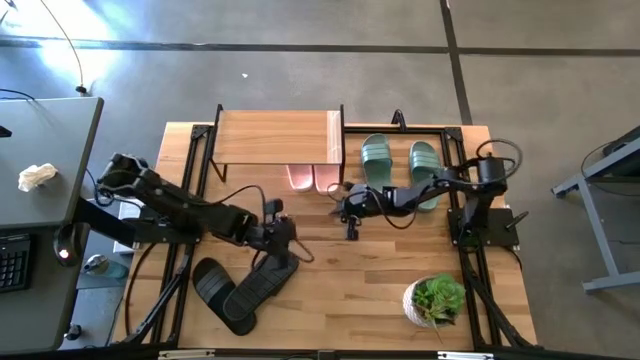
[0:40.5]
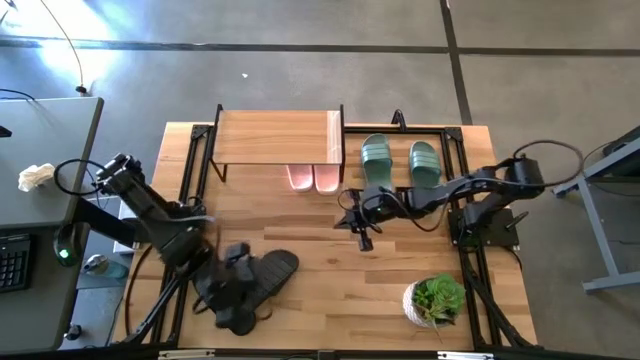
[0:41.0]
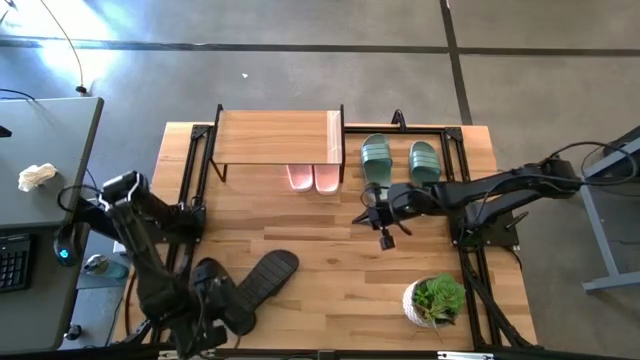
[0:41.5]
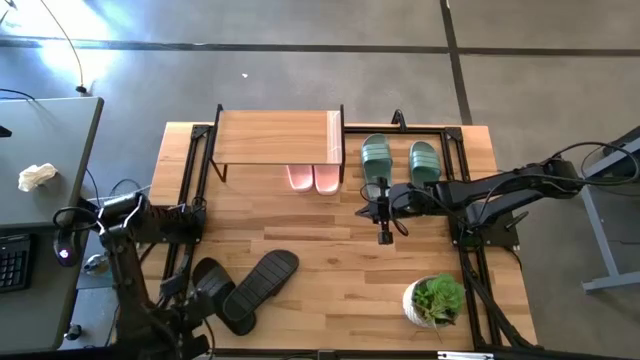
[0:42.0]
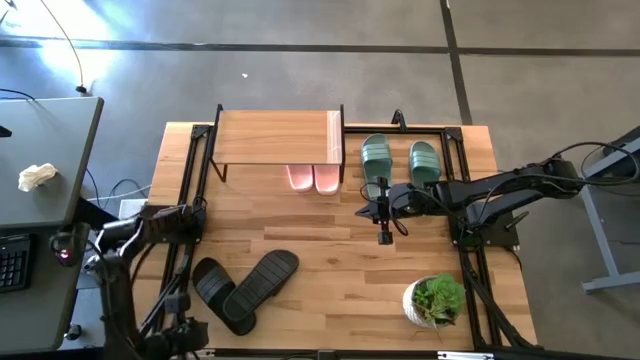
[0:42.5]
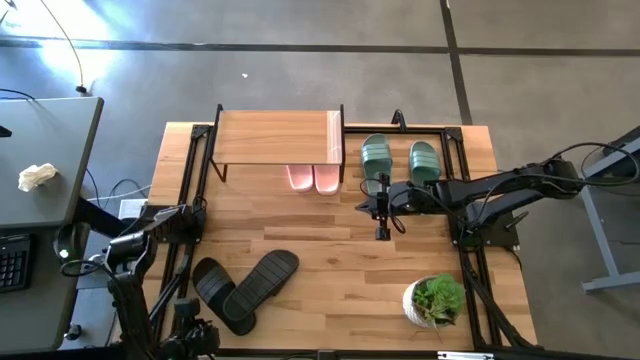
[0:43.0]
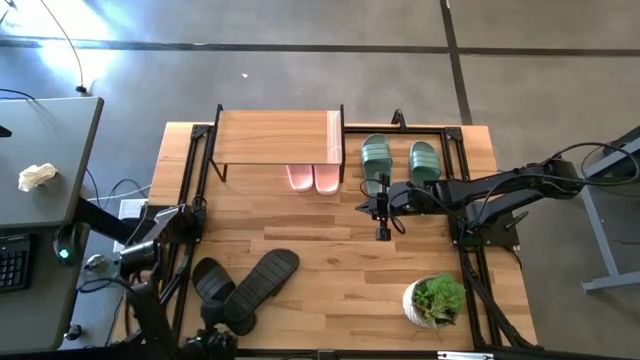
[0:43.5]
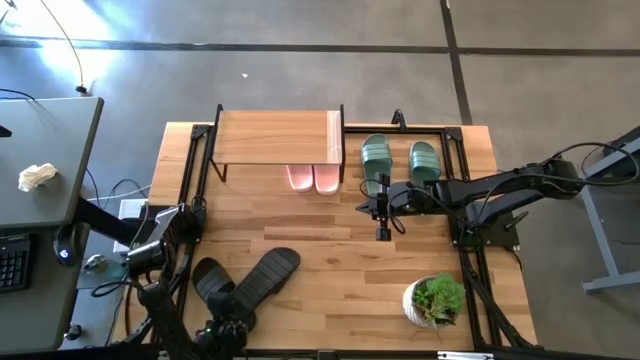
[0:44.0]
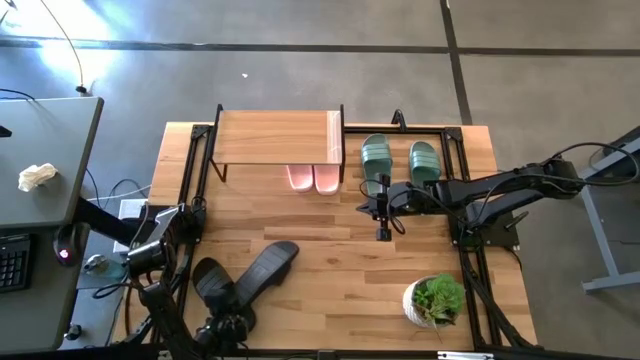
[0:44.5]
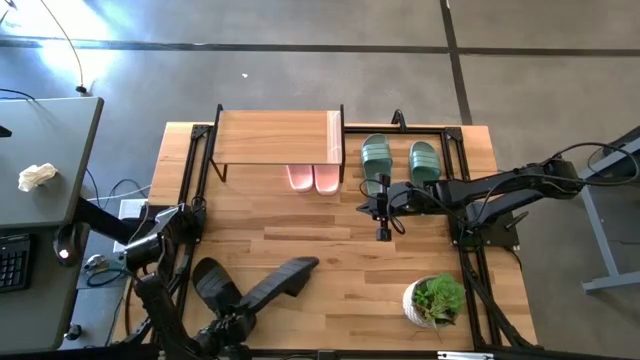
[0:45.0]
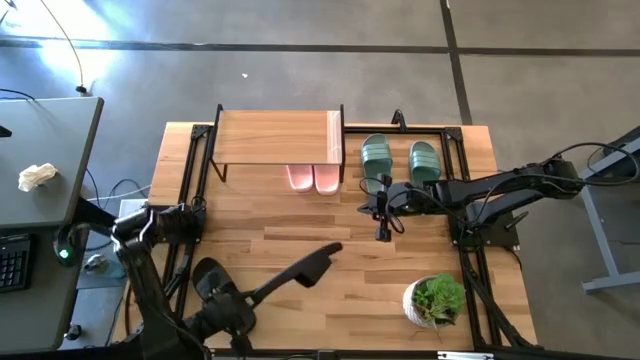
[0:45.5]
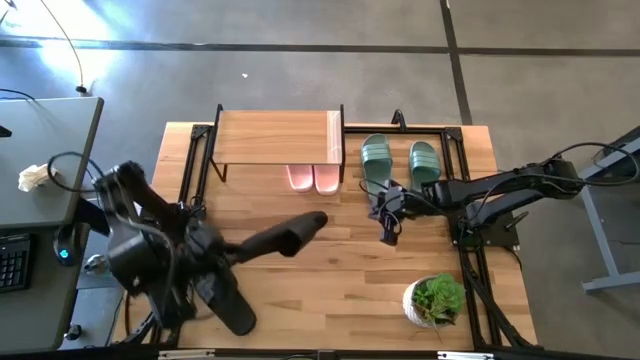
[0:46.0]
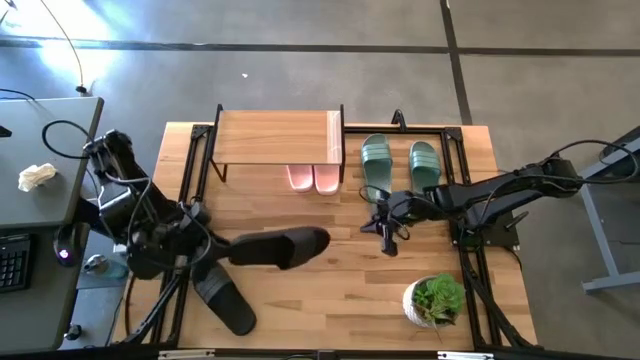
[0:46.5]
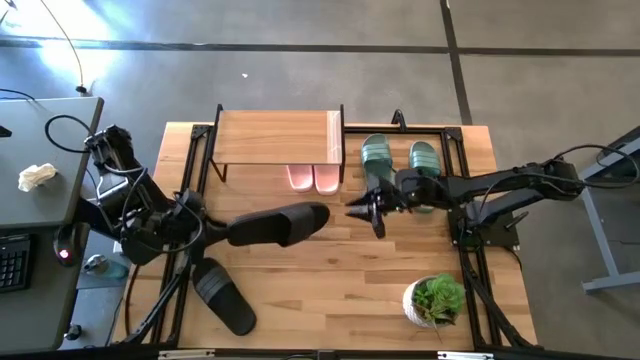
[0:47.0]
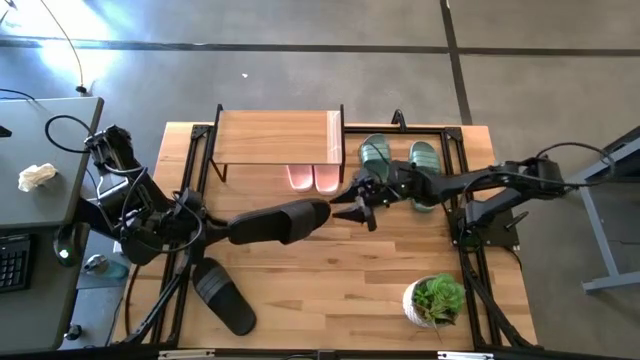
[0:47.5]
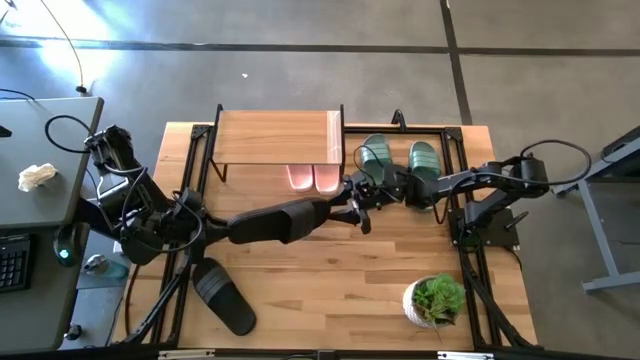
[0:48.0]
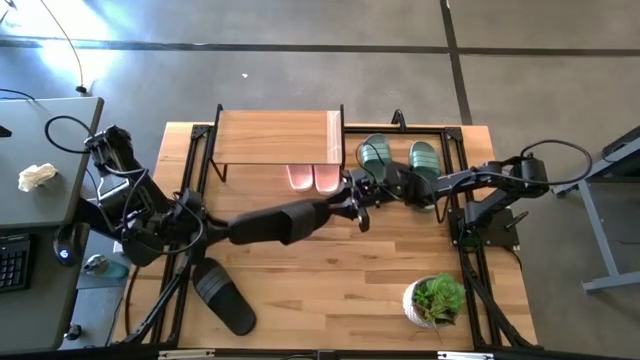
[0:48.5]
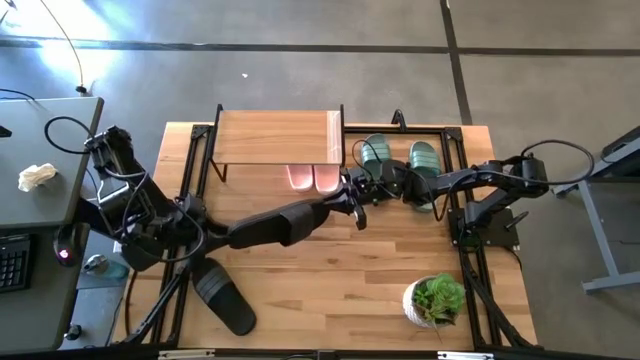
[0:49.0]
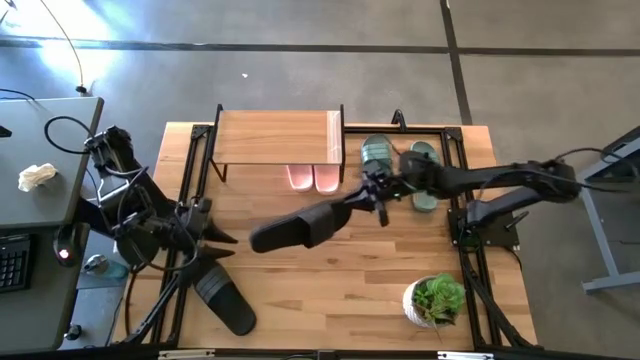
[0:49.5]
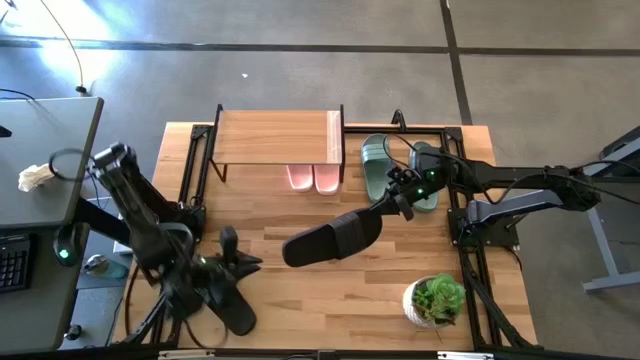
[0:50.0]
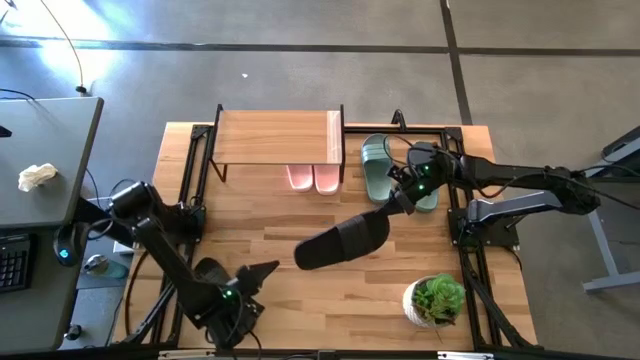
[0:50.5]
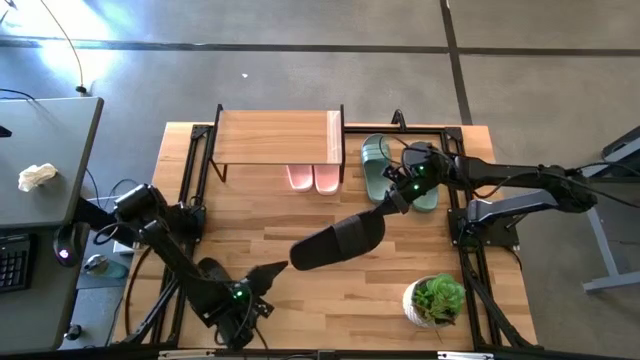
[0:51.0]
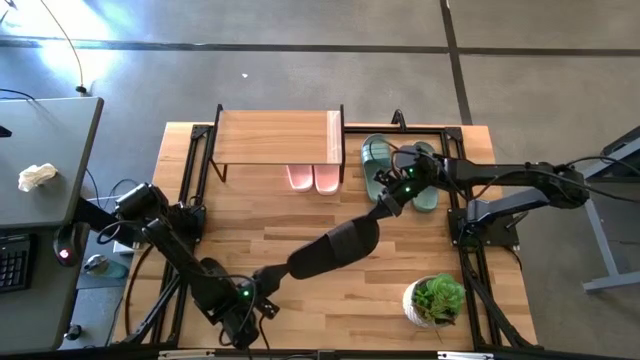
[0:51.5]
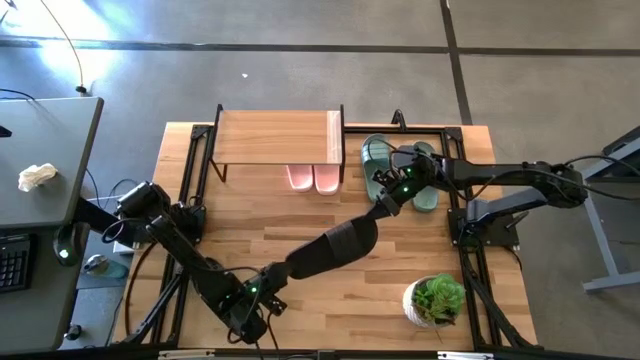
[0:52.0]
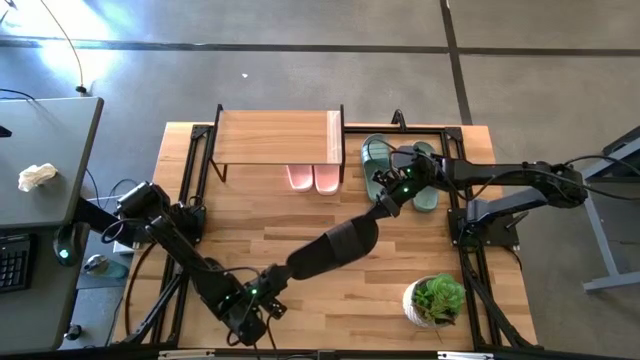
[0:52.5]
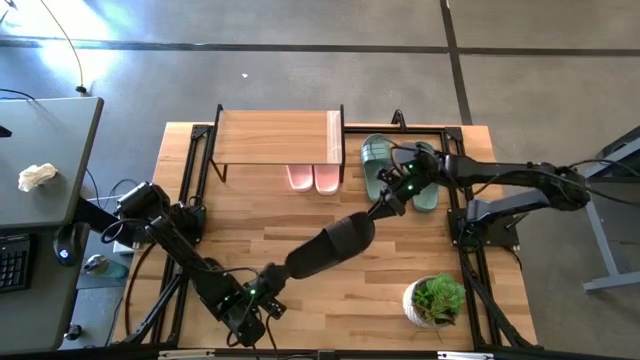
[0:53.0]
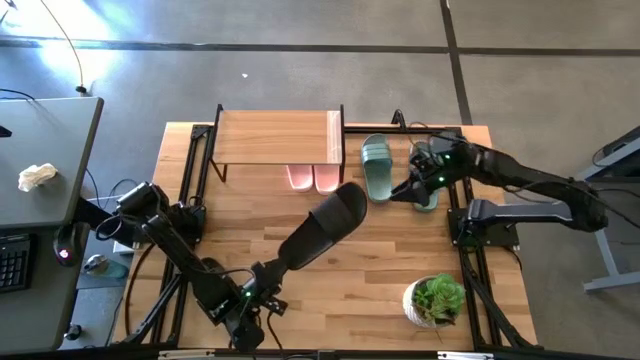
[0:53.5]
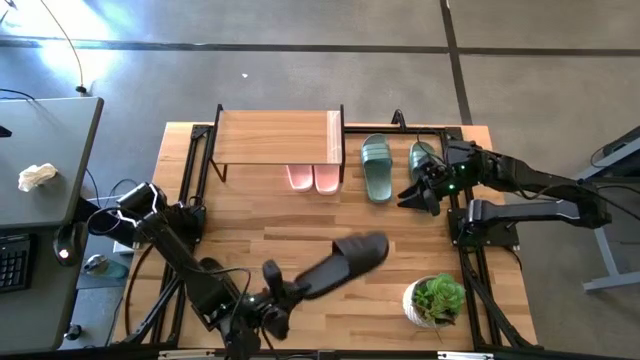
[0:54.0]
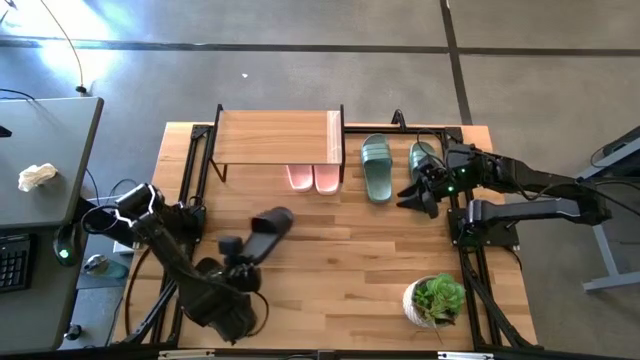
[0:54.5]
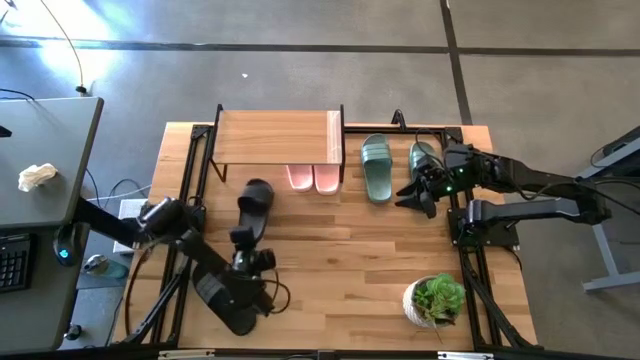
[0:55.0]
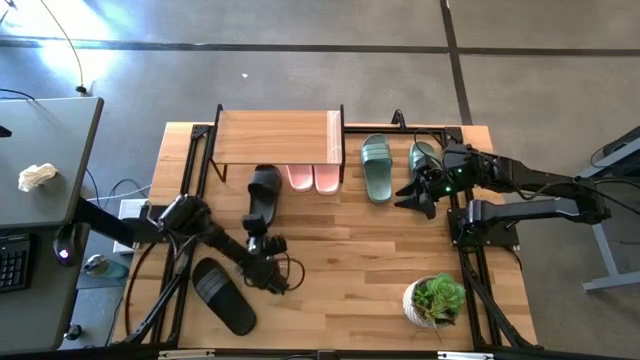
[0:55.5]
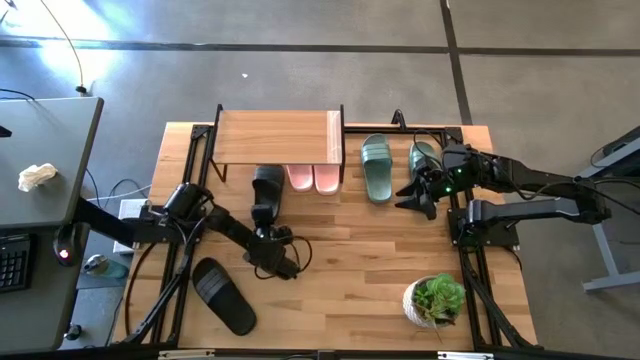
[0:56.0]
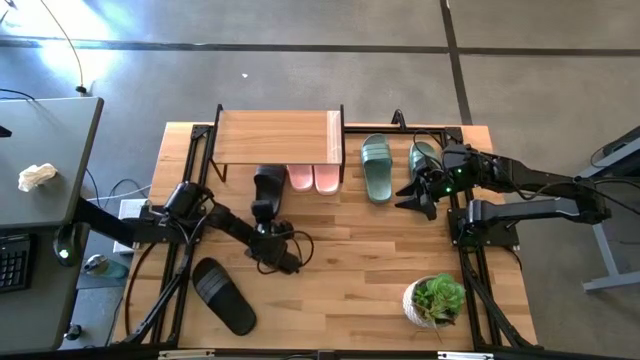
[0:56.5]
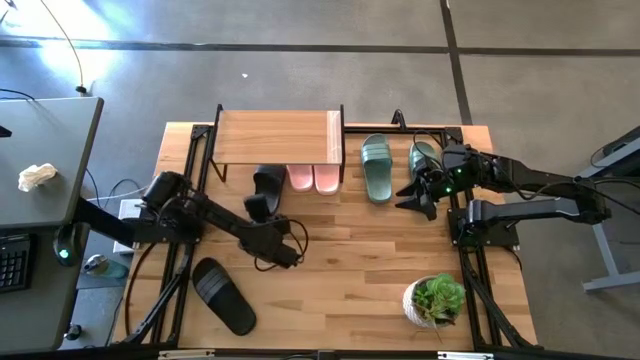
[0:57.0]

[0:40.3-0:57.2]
Task: Pick and place slides into the shelf
Put the right black slipper under the shelf
